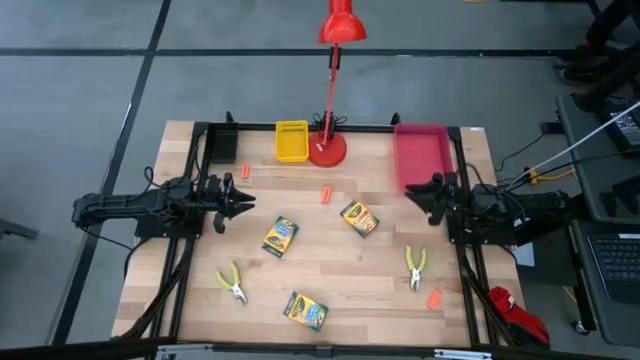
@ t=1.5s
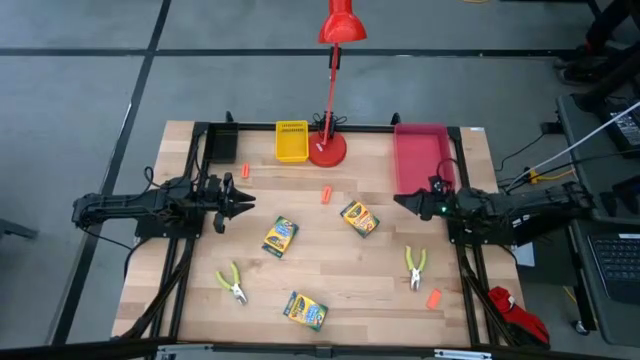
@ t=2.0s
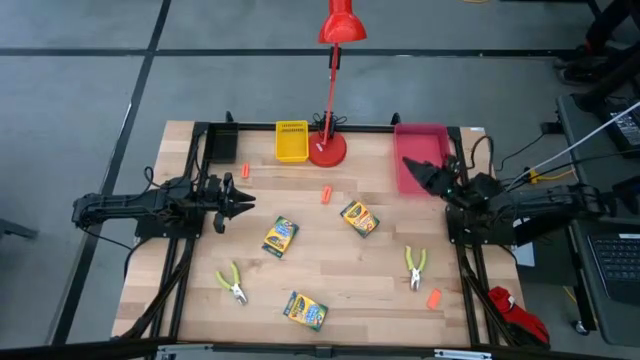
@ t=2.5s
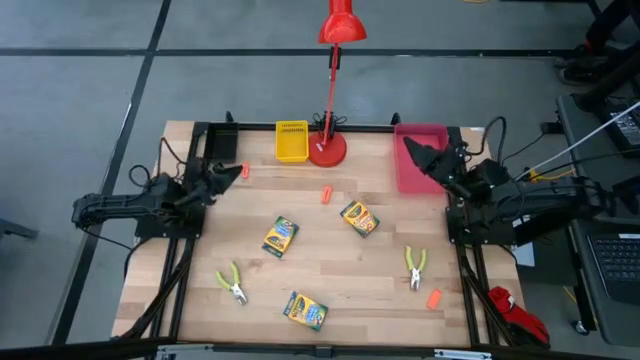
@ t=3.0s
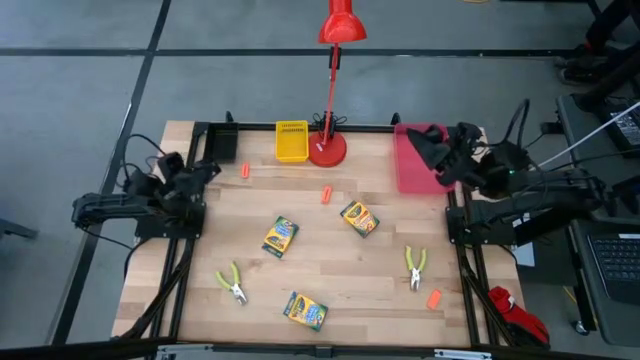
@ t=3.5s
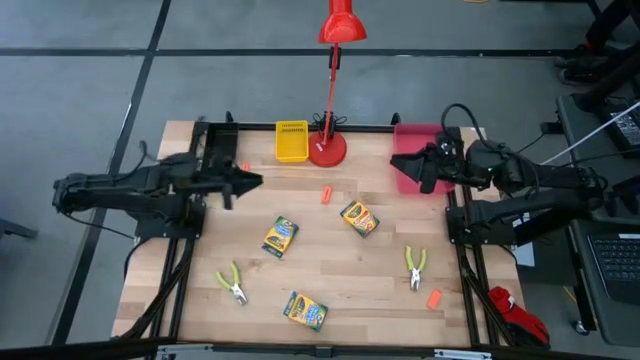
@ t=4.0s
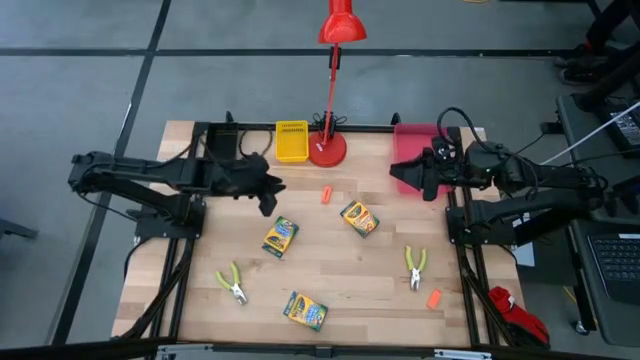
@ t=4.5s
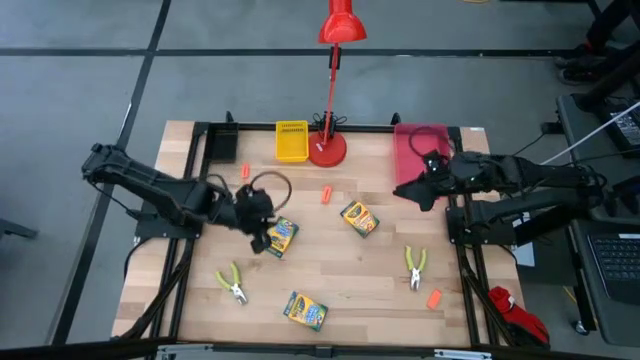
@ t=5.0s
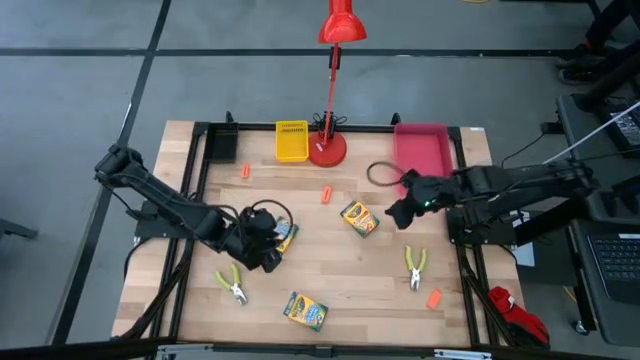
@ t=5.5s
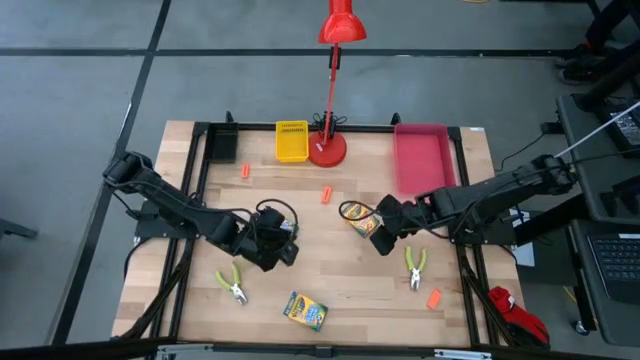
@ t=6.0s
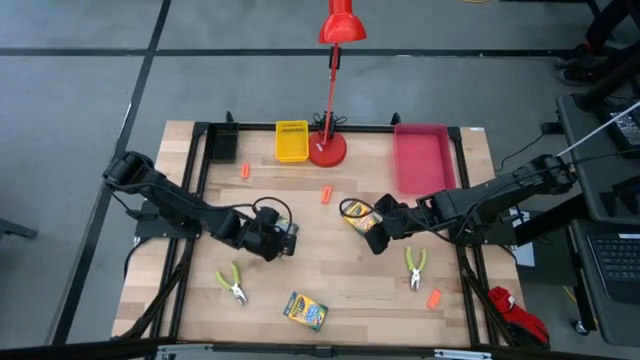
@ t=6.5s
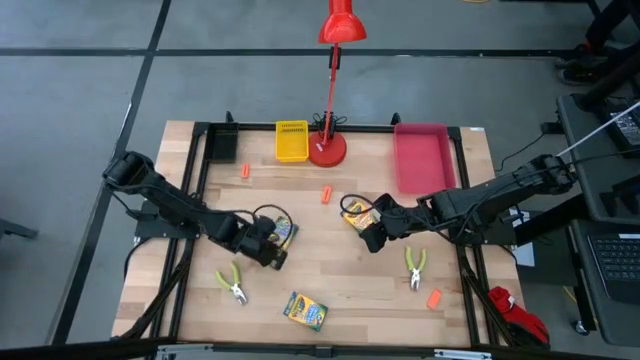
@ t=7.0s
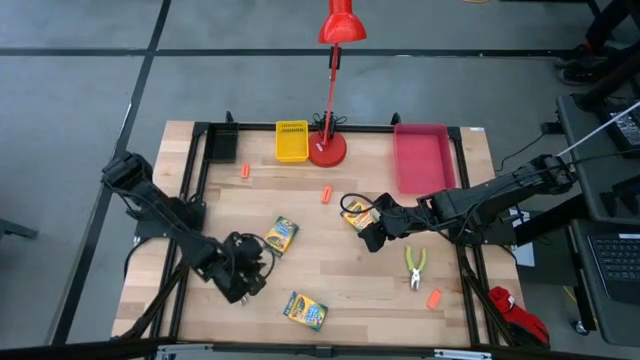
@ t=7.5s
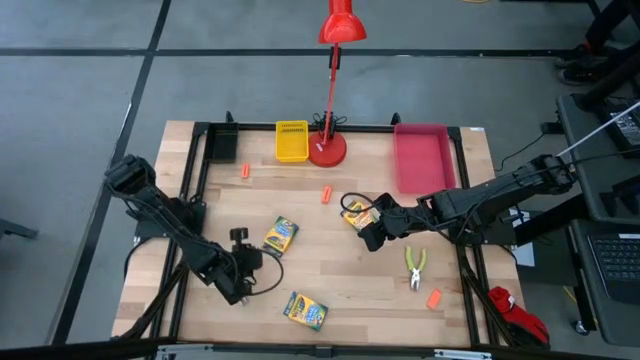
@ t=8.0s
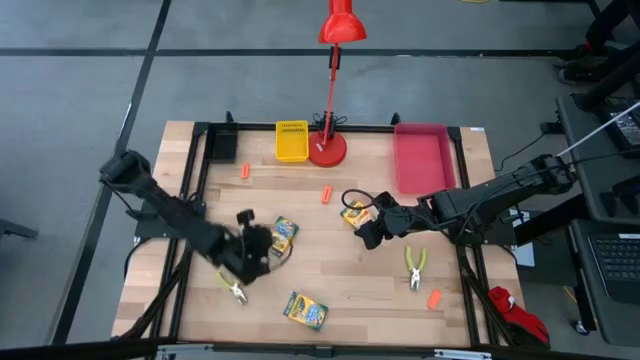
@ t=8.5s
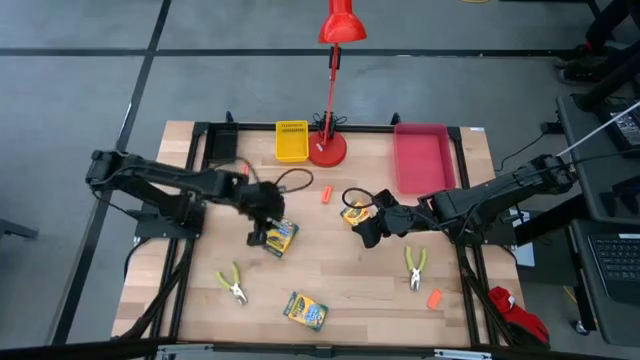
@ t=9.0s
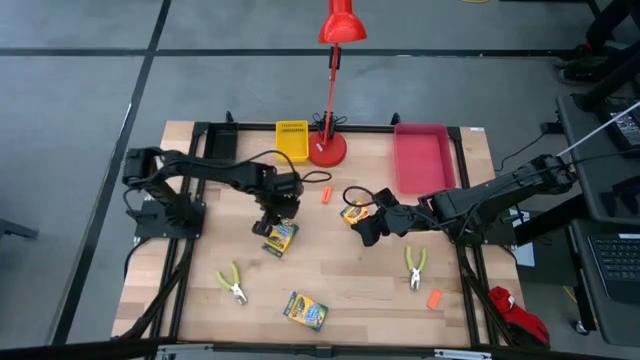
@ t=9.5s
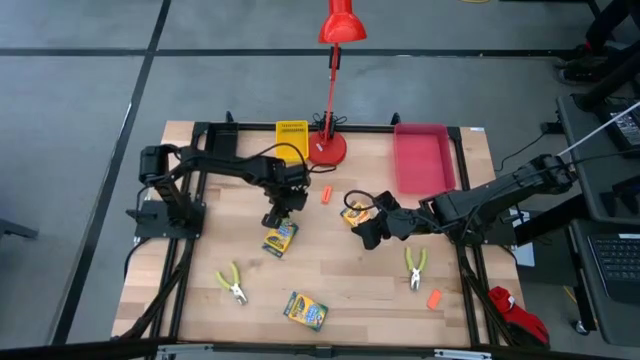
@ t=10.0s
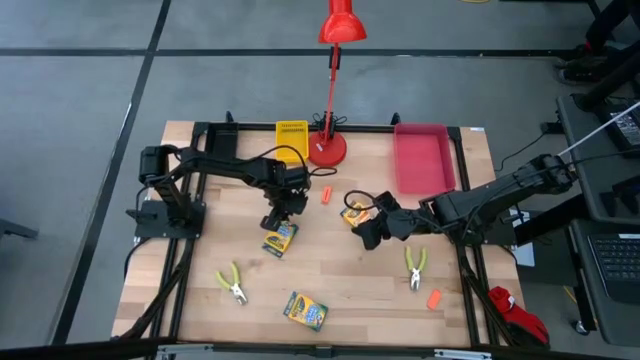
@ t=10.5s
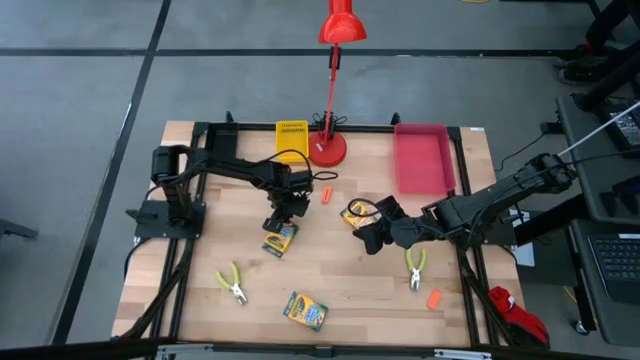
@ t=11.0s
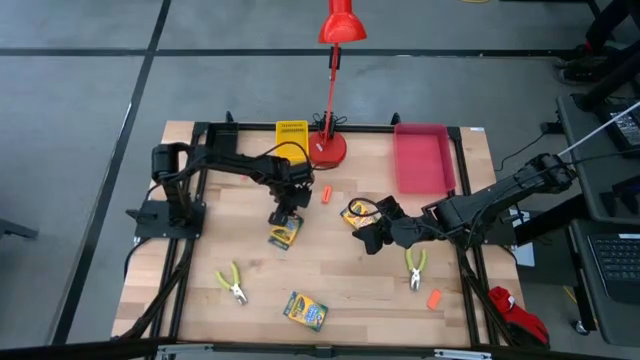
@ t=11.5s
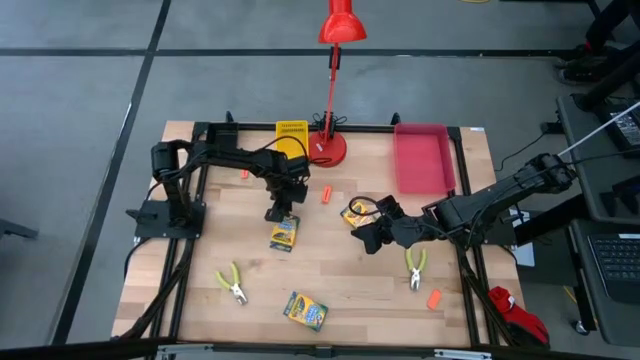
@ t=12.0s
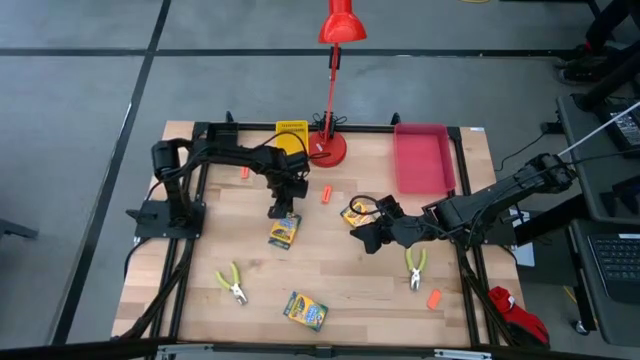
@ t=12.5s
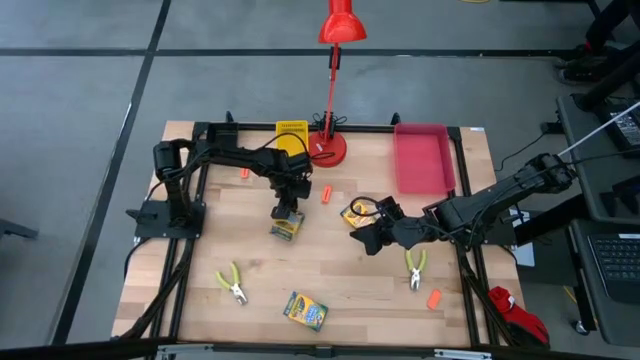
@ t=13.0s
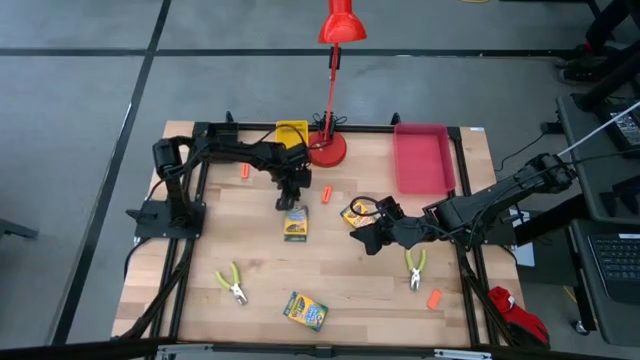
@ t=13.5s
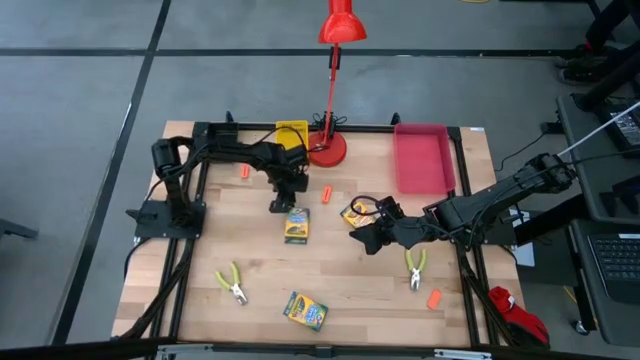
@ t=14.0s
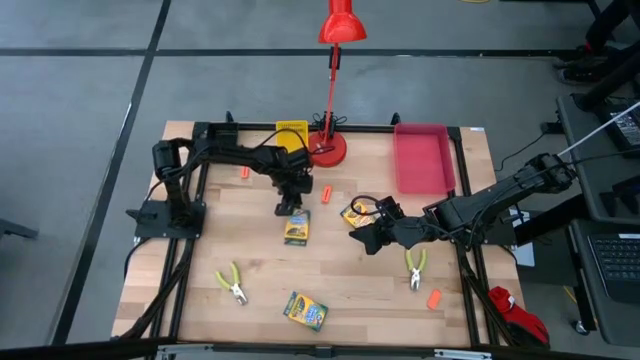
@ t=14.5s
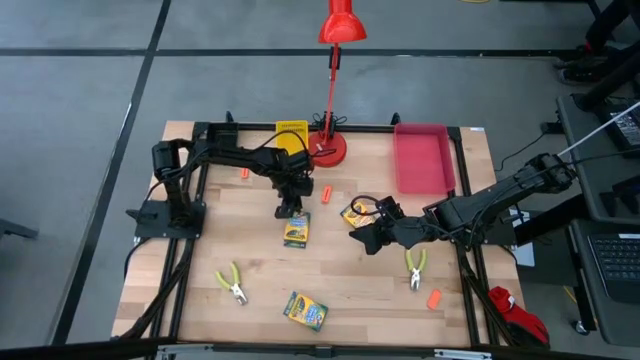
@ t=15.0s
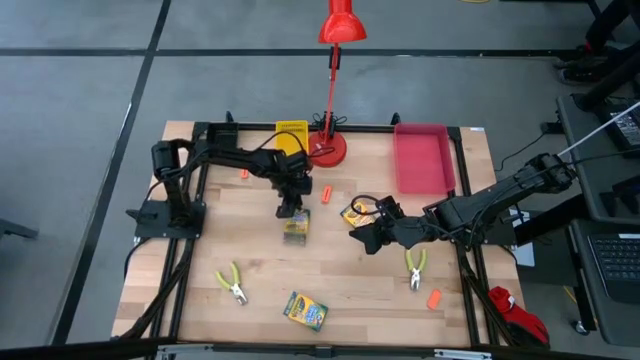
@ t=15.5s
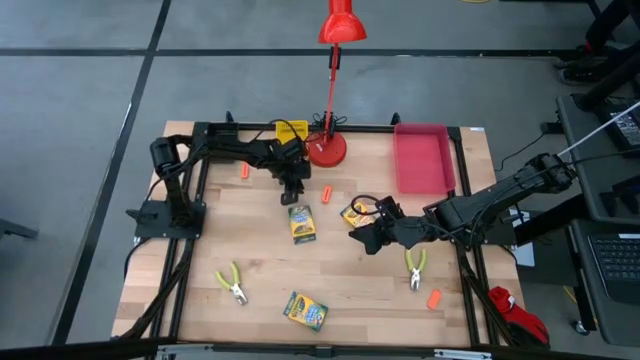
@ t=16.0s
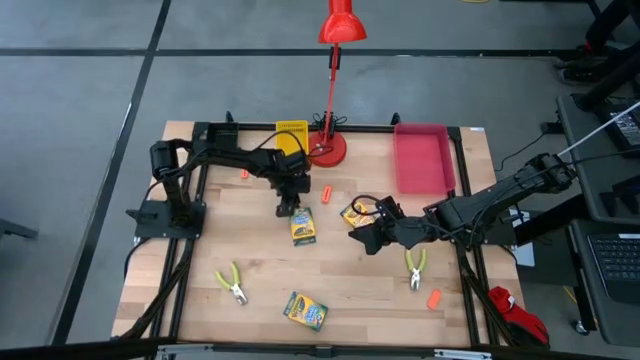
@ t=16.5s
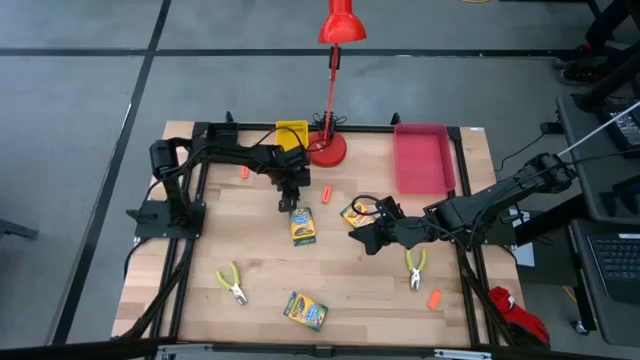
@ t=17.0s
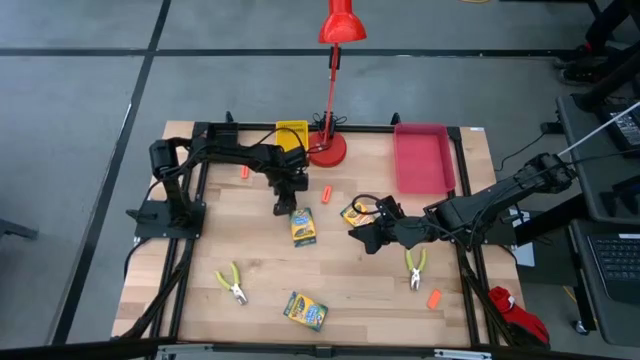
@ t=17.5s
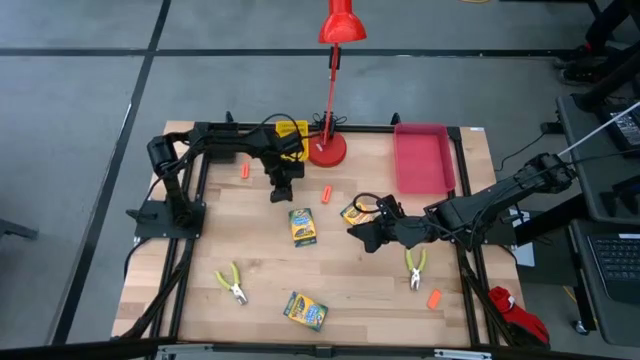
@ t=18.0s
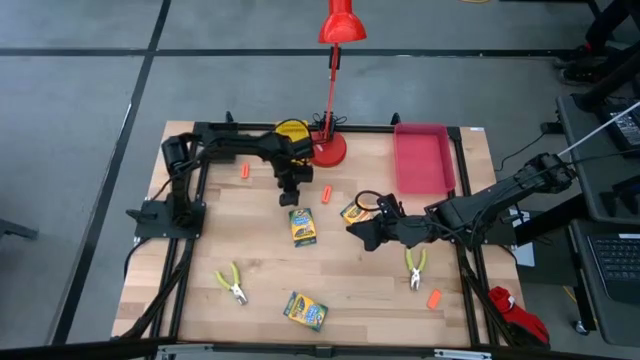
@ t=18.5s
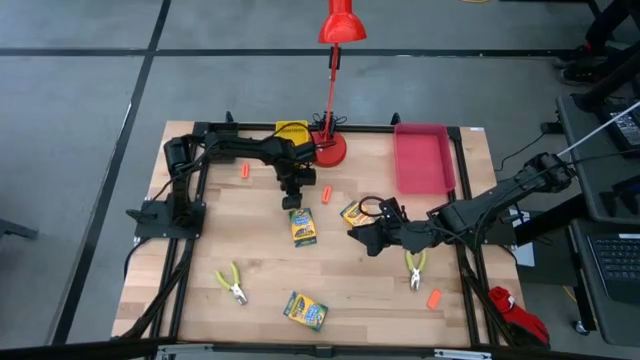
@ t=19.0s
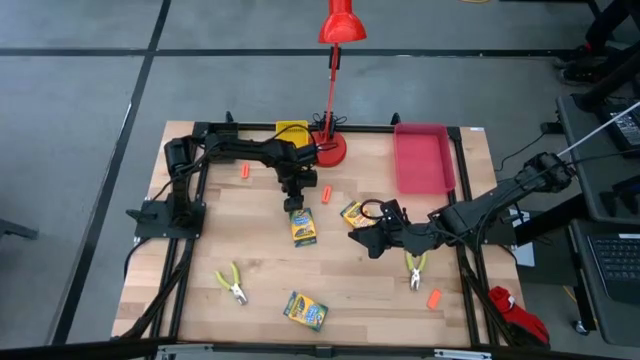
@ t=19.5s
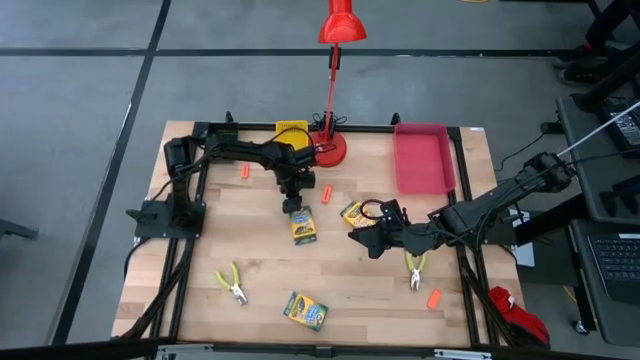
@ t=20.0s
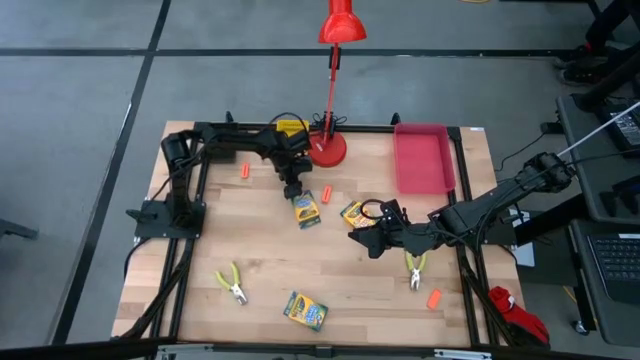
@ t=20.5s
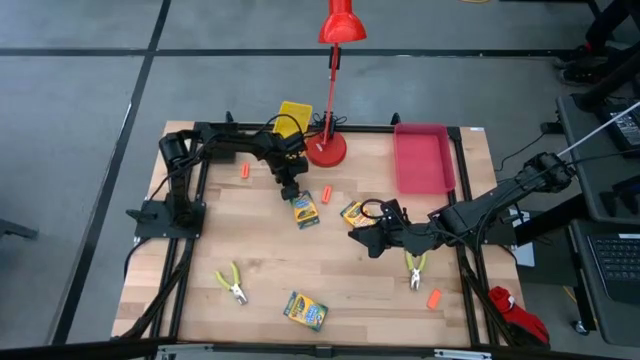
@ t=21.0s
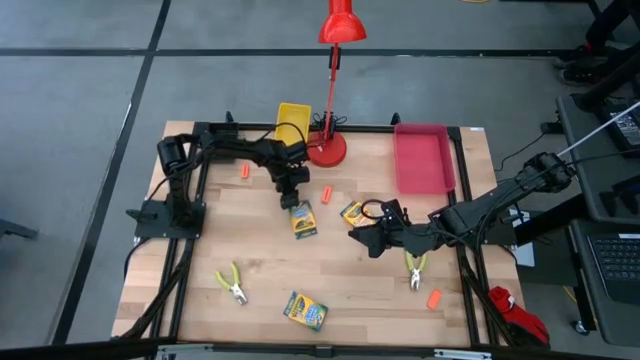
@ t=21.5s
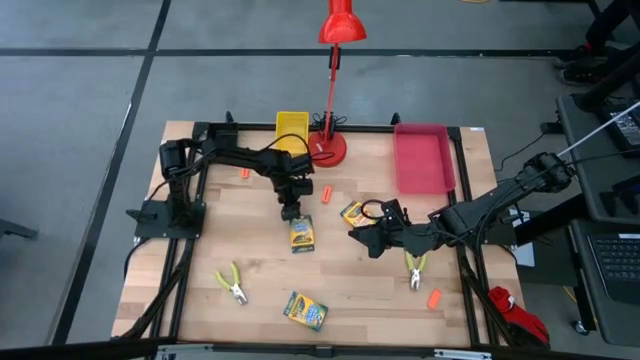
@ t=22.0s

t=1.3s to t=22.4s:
Task: Pick & Place School Supplies
Adjust the yellow crayon box
